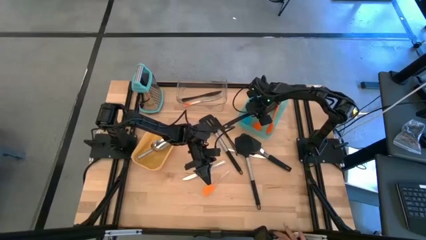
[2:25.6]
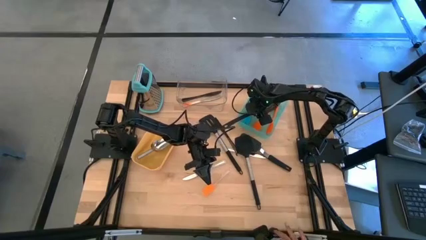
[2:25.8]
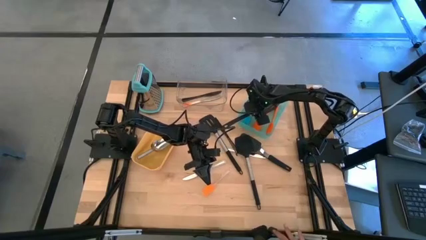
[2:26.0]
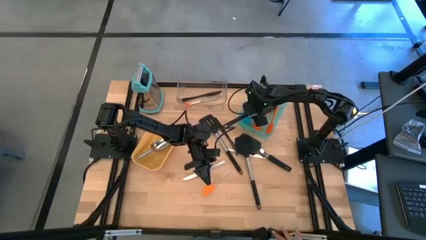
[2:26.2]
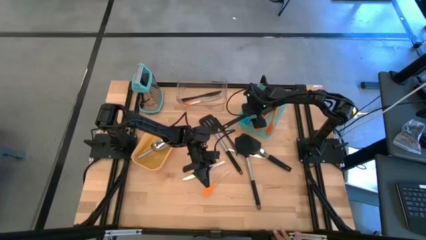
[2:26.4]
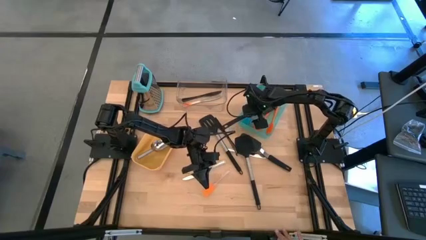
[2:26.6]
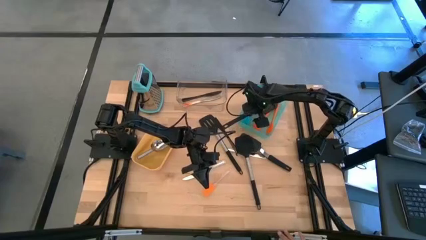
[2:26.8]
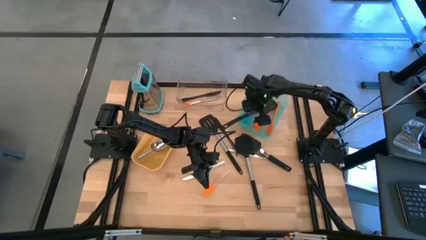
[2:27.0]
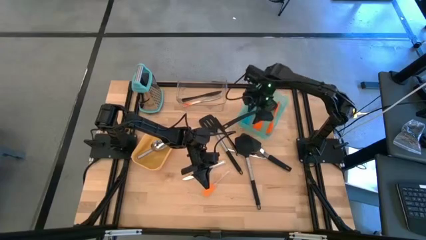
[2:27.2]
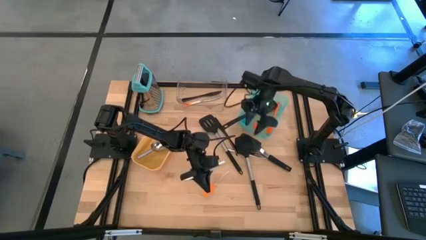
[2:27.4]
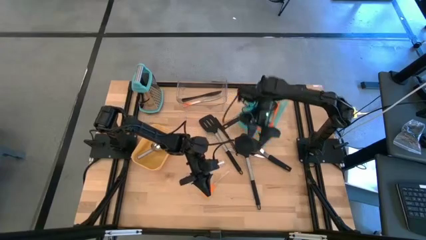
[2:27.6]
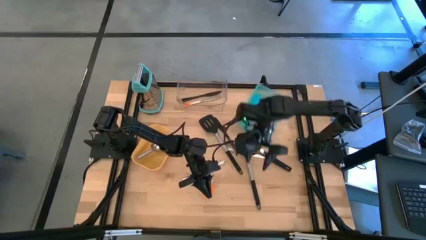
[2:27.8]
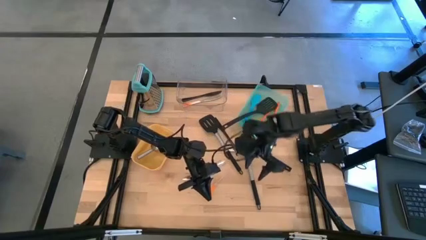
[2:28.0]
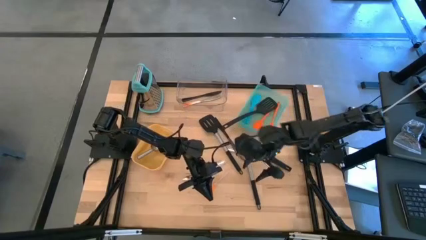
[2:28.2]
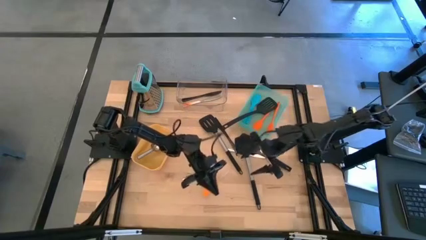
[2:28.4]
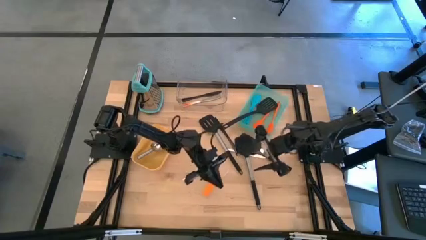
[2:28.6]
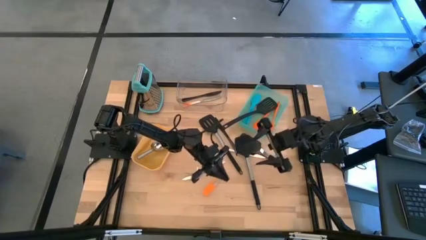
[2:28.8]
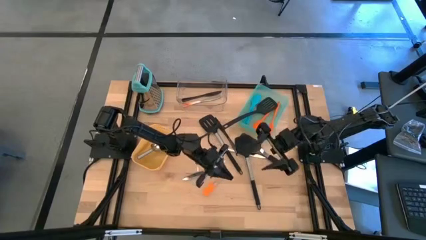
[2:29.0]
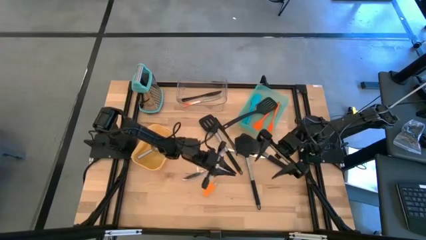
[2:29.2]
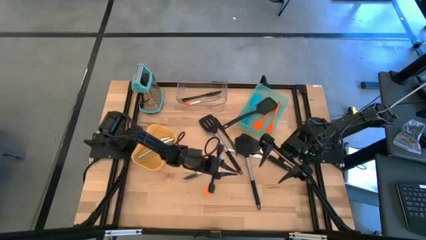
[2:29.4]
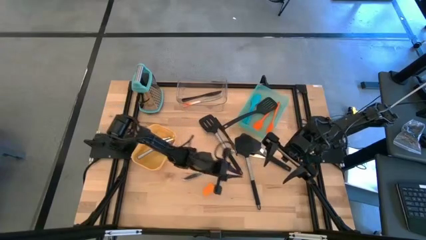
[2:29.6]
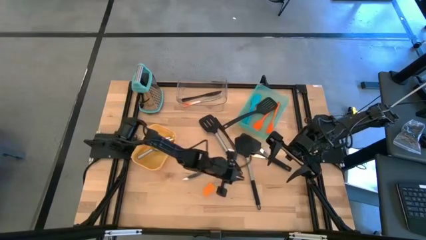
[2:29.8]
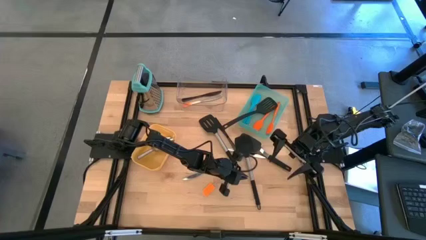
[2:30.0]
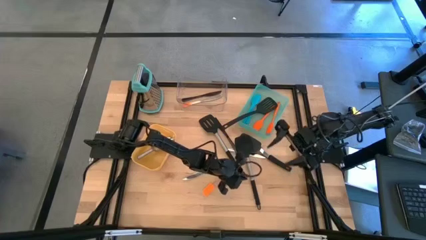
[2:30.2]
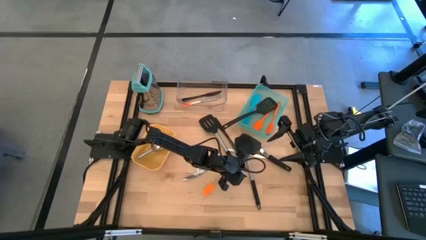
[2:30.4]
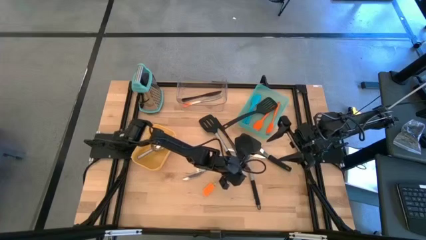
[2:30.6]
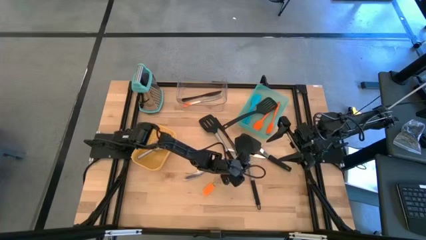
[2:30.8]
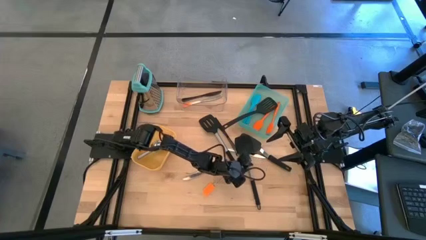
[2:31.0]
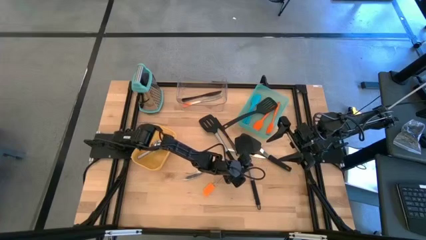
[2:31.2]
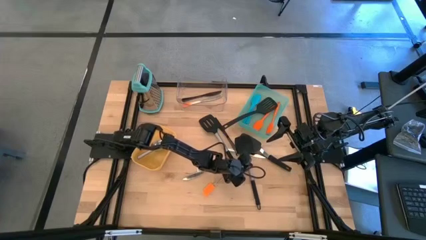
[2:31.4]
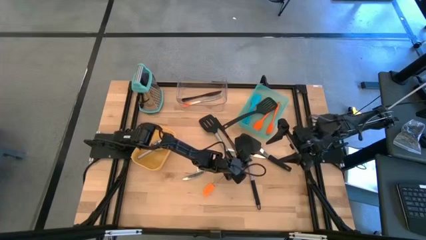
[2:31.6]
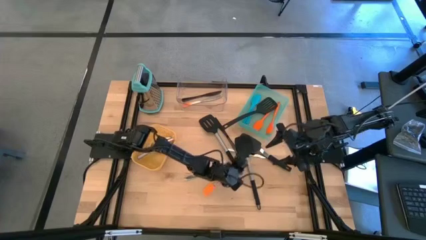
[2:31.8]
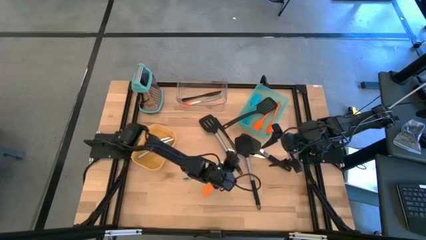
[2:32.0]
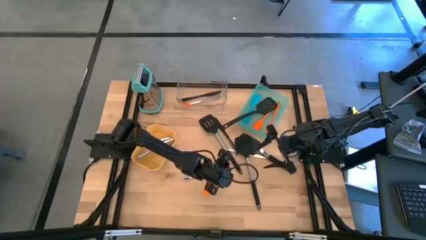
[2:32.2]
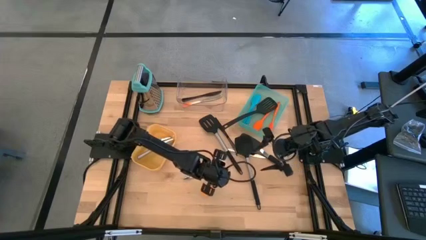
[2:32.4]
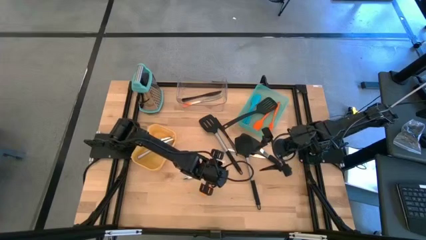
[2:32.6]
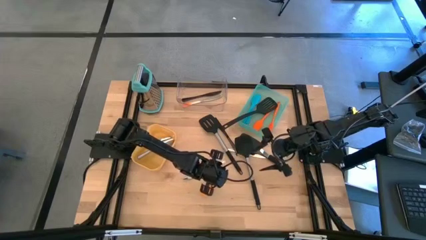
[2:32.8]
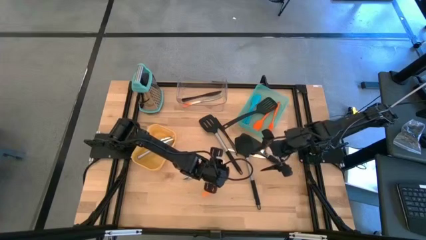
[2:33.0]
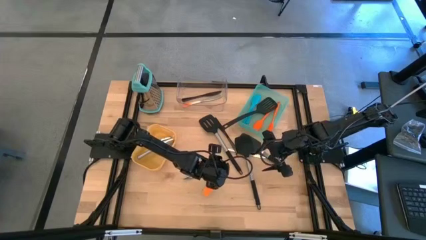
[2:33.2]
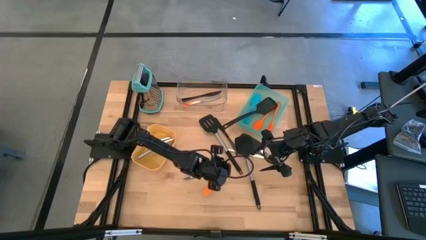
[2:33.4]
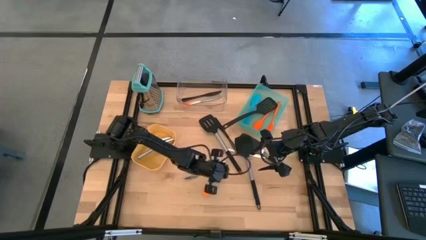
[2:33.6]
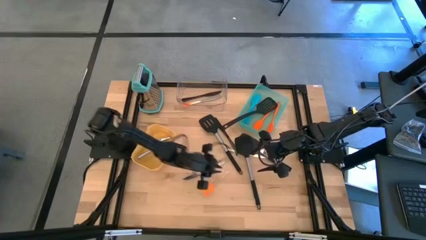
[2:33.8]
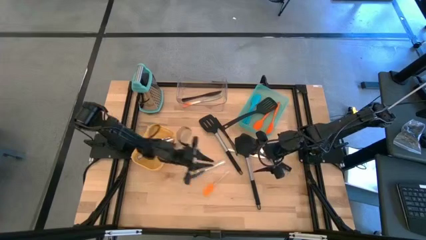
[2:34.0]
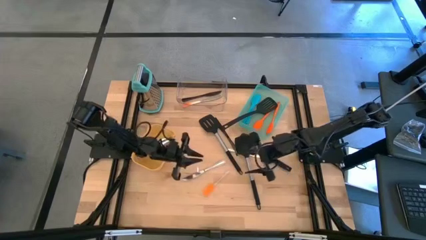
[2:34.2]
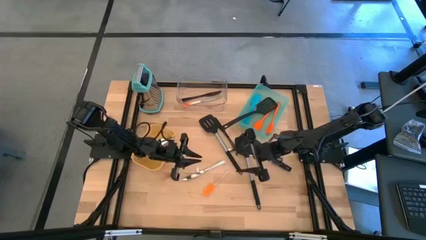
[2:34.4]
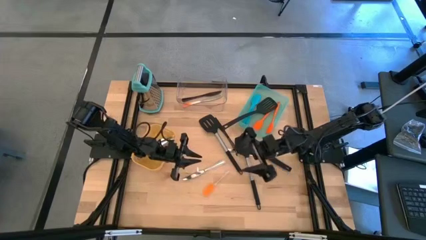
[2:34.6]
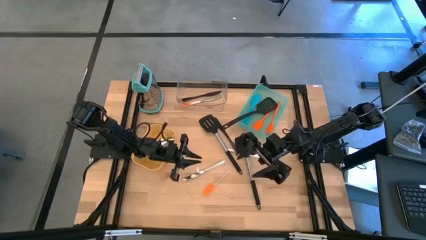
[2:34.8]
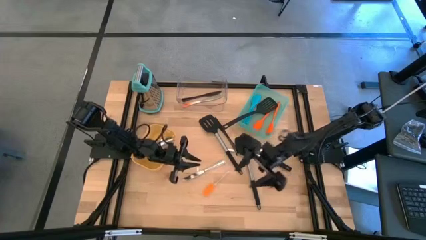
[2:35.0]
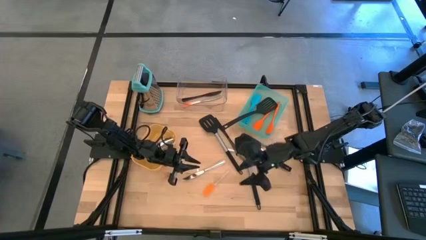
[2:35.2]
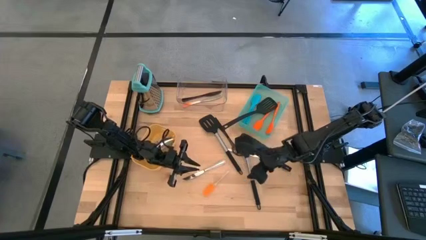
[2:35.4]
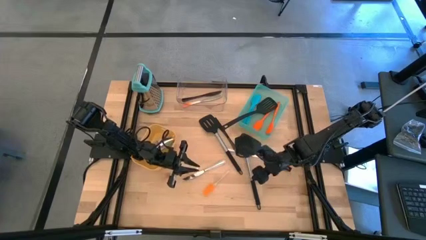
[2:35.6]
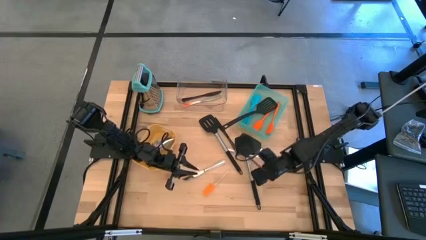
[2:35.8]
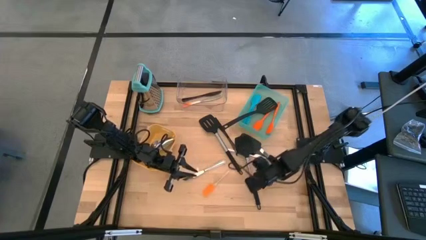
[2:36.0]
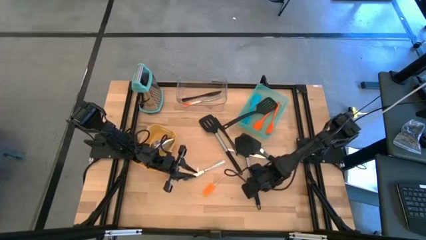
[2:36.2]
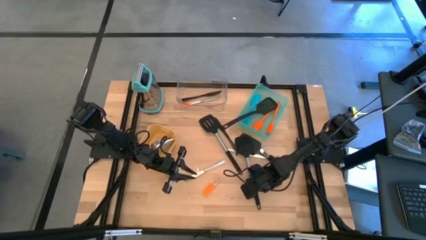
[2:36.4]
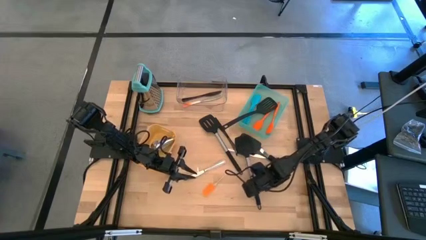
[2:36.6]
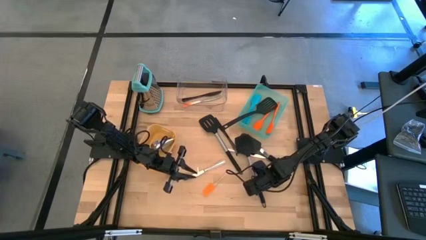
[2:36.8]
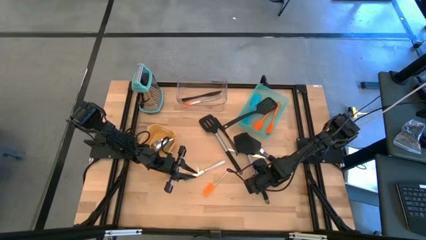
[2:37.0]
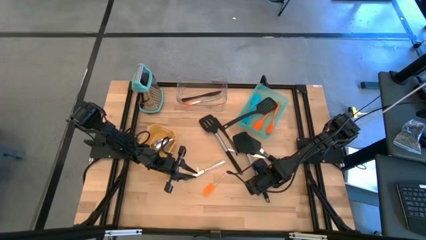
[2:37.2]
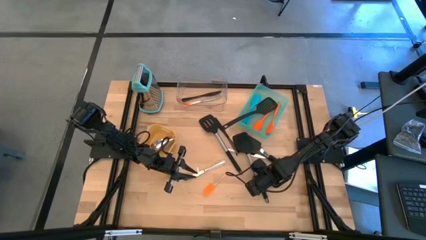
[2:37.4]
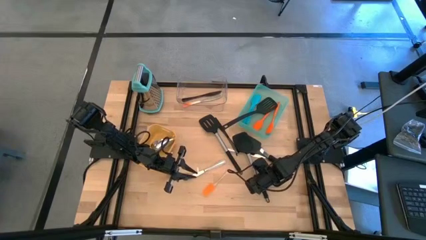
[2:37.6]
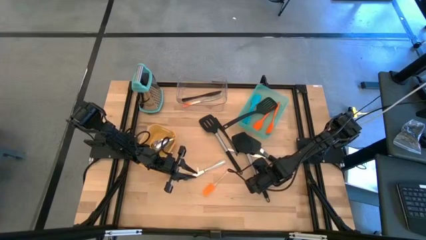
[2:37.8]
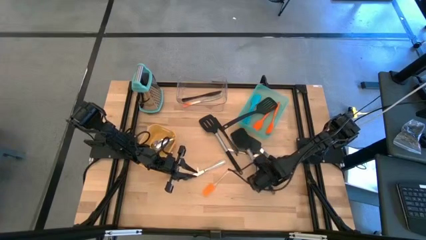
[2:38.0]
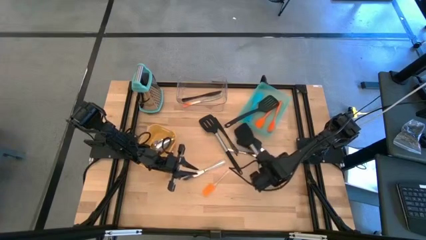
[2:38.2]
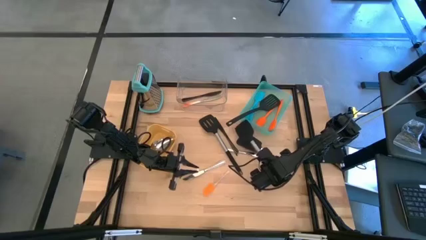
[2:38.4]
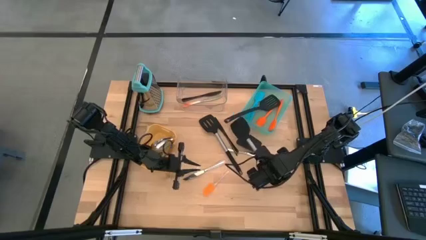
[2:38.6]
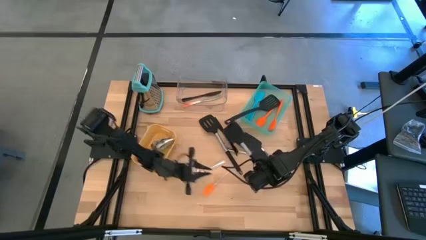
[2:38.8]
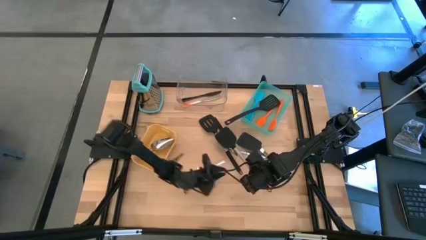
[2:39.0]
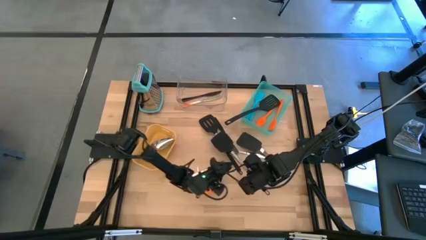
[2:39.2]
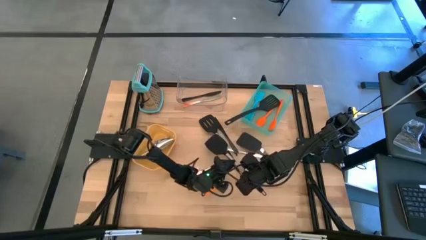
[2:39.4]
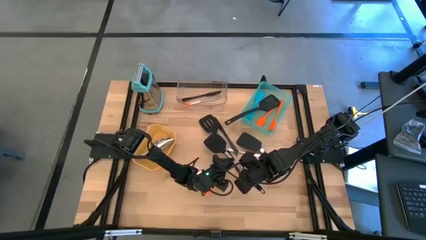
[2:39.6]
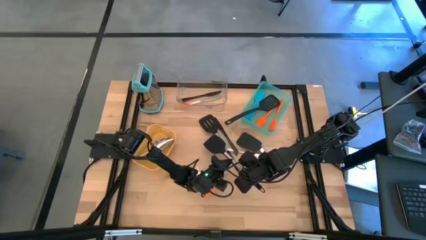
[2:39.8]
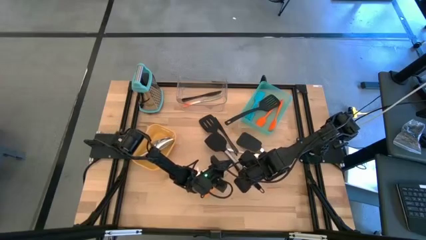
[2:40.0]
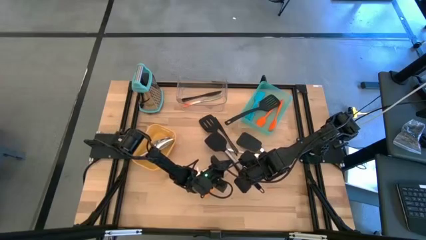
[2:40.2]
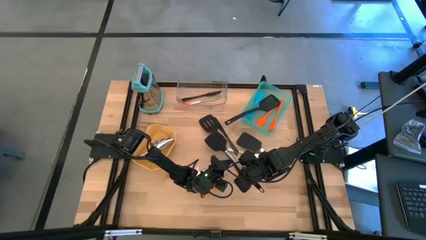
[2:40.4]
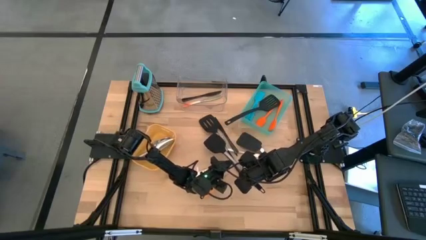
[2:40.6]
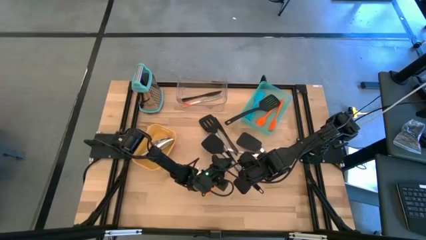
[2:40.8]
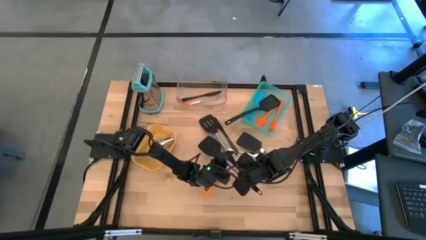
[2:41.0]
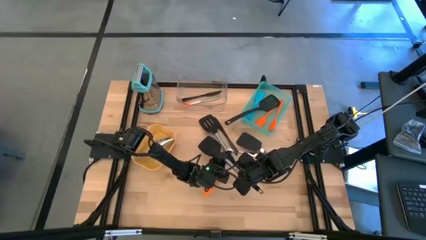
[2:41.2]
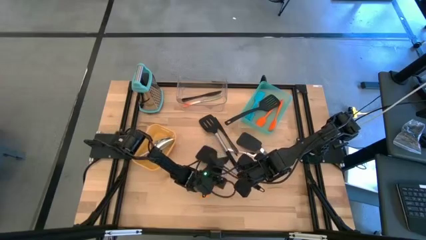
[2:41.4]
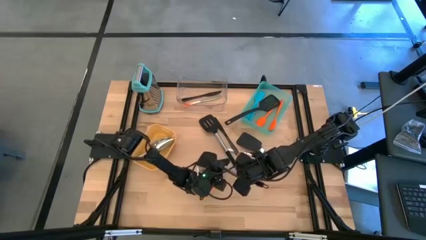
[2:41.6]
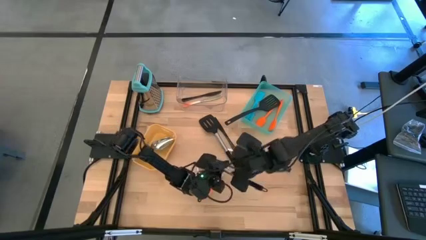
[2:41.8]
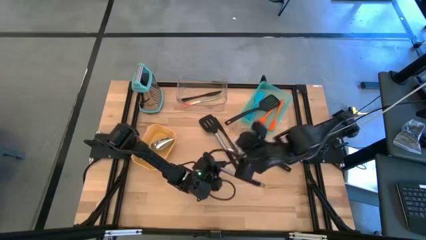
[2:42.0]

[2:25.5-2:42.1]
Task: Pick & Place Kitchen Items
Put the black spatula into the green bin
